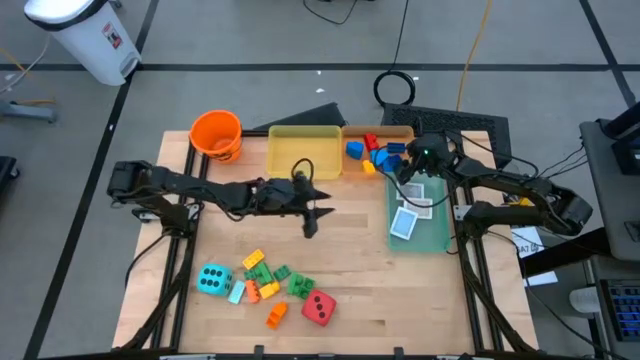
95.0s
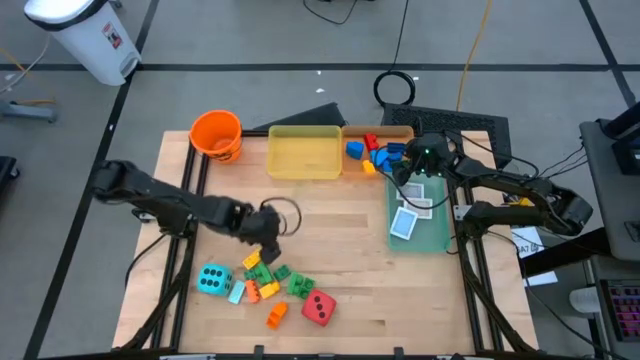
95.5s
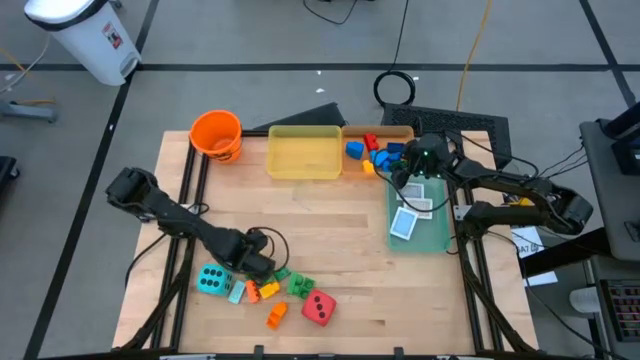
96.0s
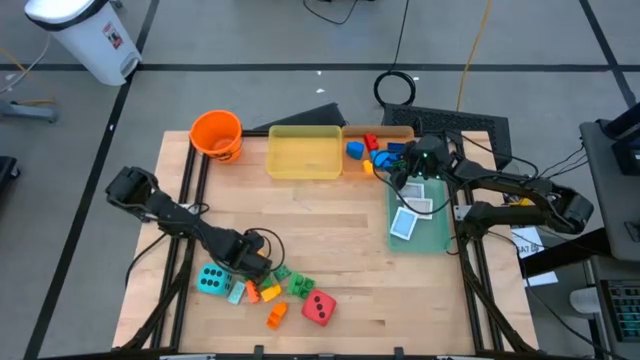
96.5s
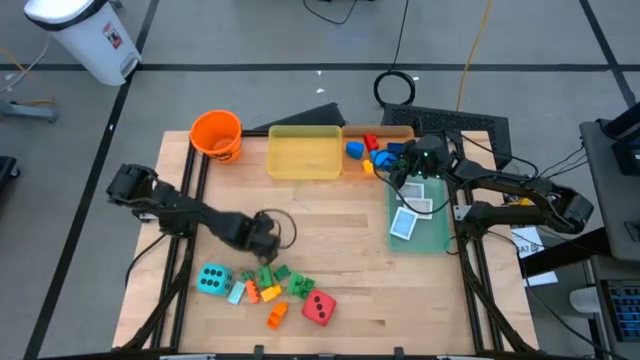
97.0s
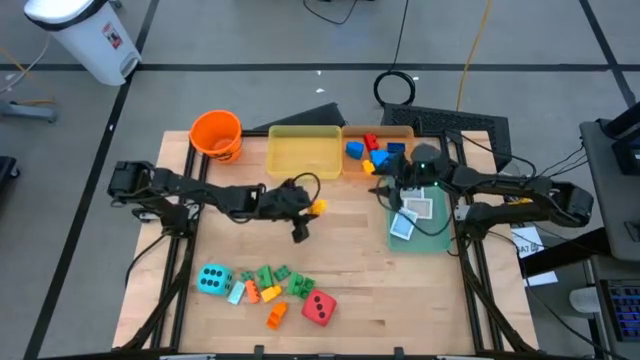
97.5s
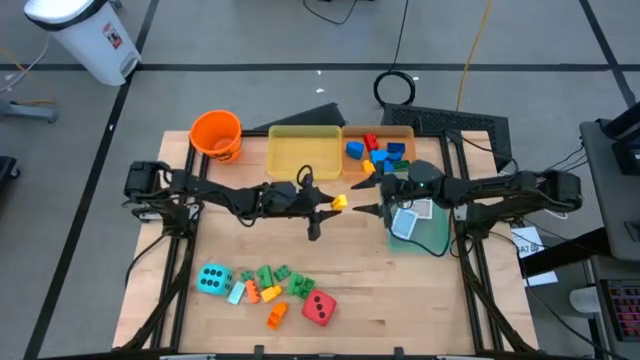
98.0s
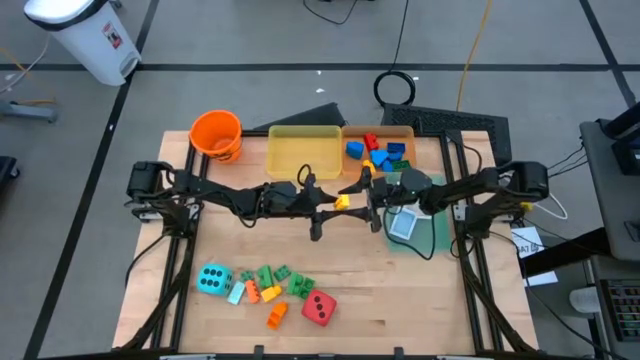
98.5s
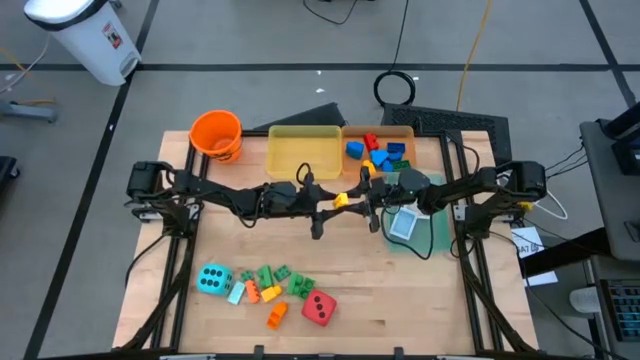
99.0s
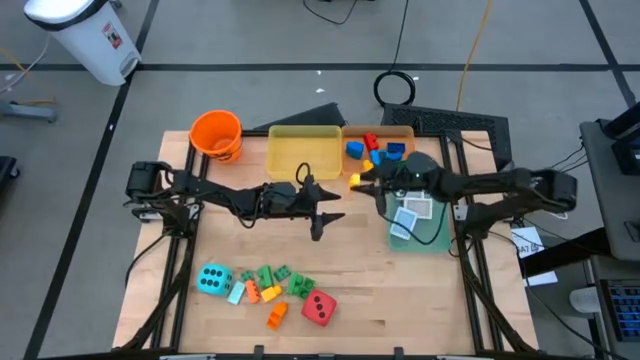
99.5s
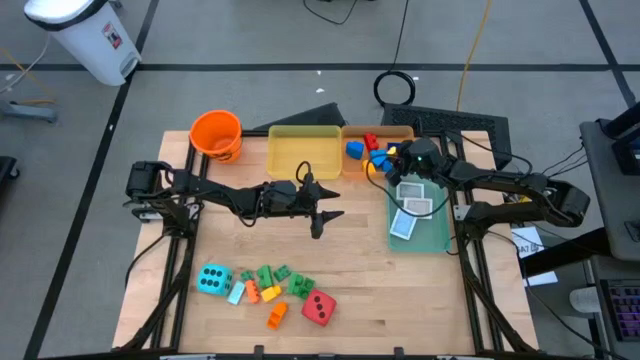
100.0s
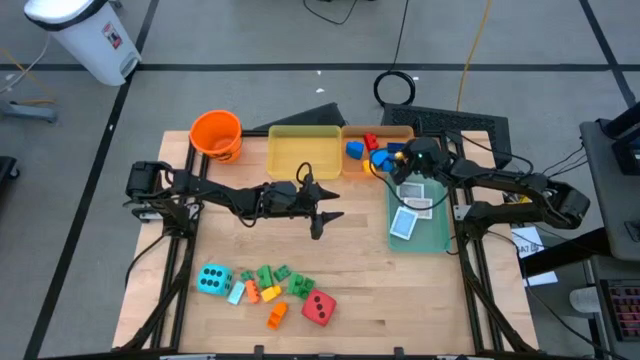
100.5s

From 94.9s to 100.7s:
Task: Pick & Place Toys
Put the yellow game piece into the orange bin

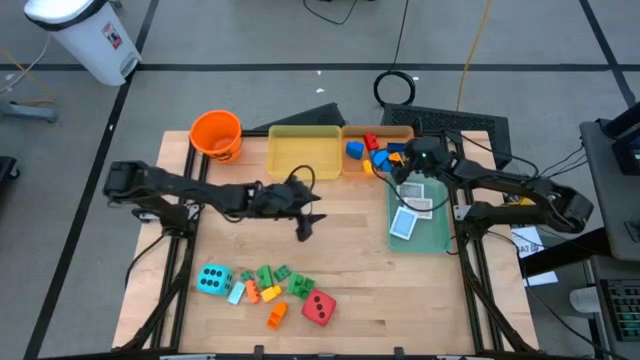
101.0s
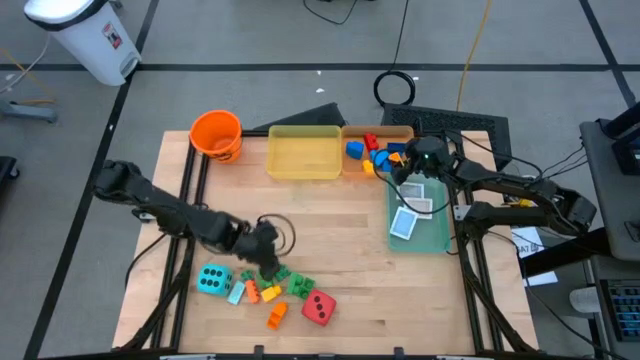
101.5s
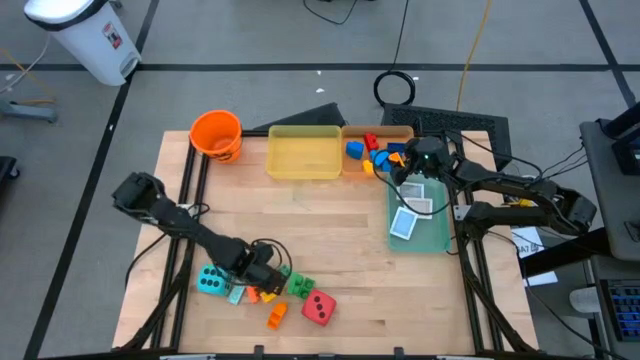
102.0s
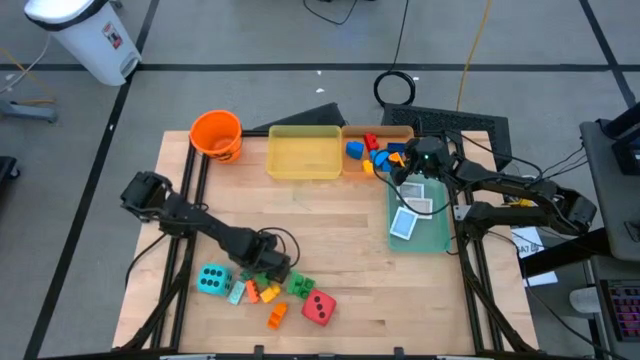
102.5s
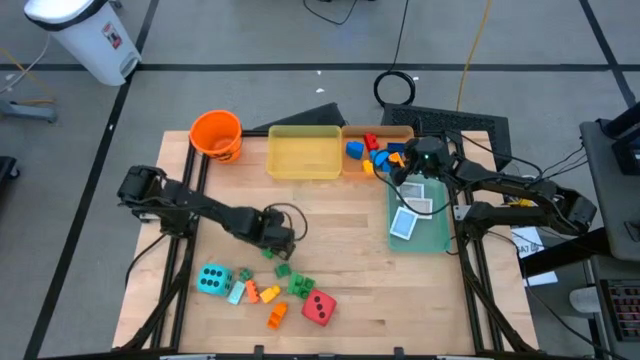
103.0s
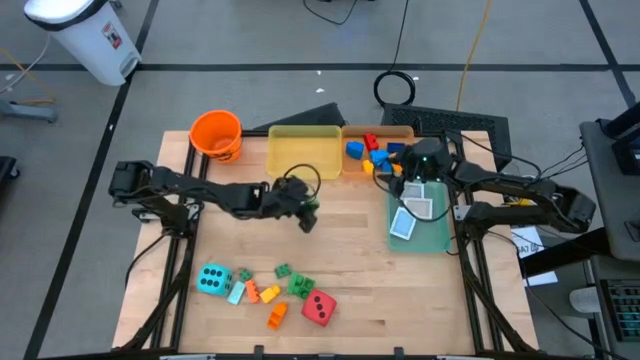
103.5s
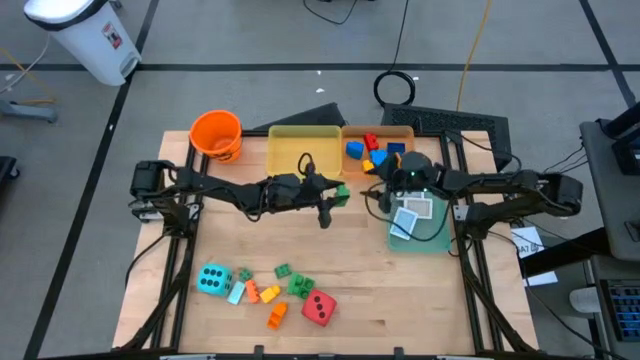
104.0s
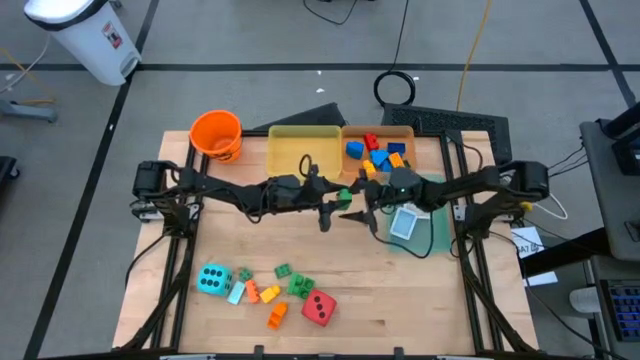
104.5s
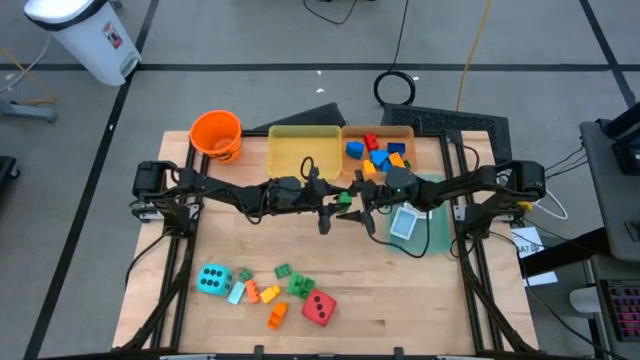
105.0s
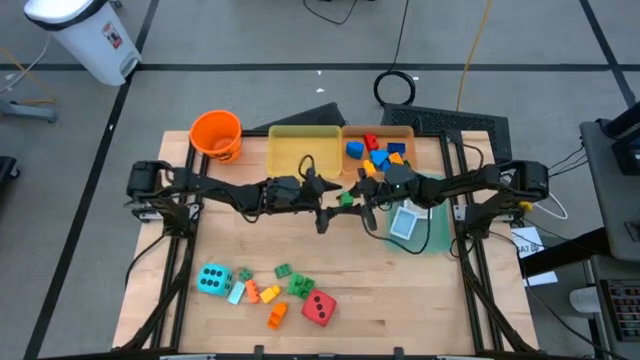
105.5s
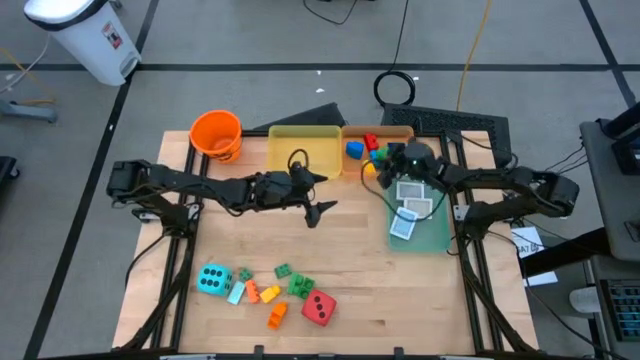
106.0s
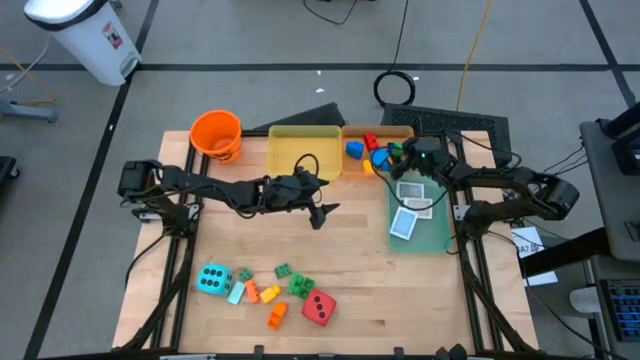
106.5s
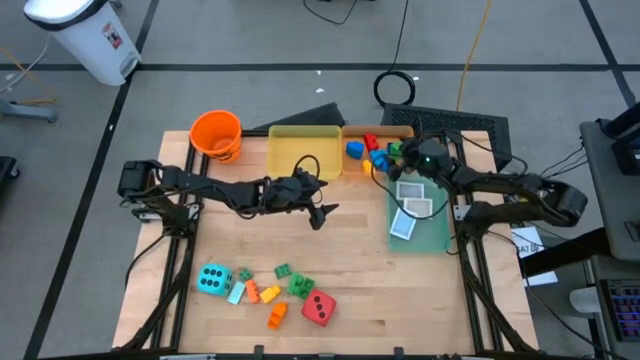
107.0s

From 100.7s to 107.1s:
Put the green game piece into the orange bin

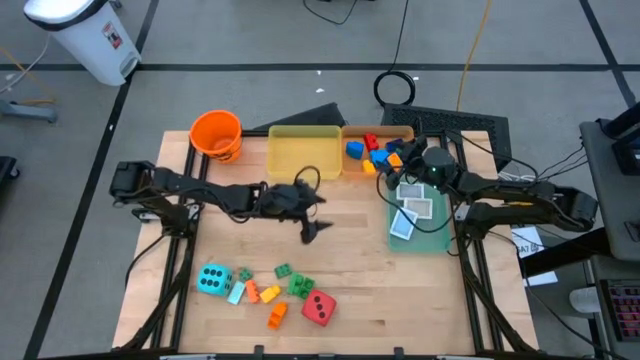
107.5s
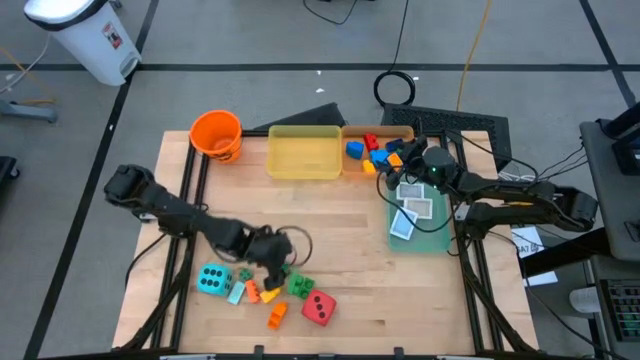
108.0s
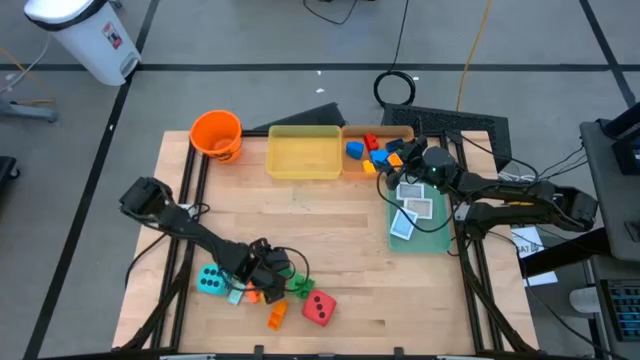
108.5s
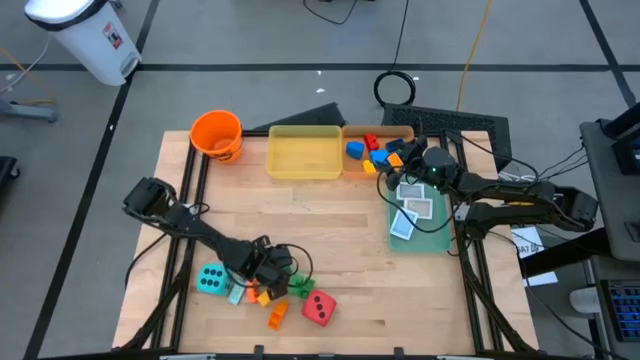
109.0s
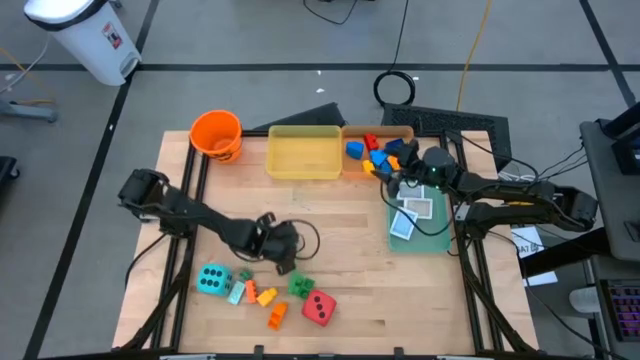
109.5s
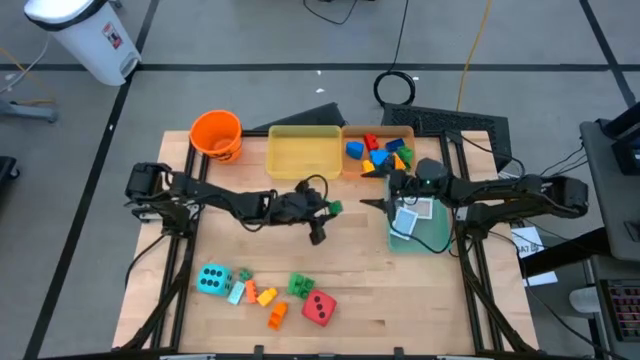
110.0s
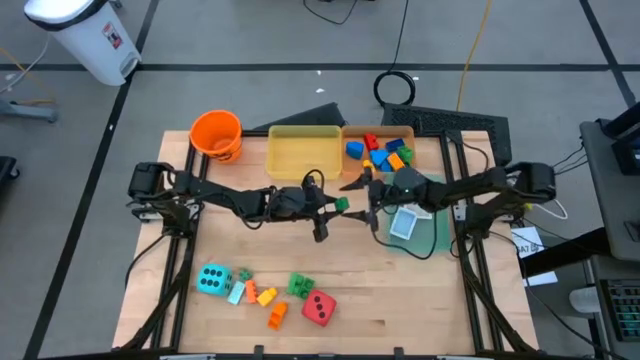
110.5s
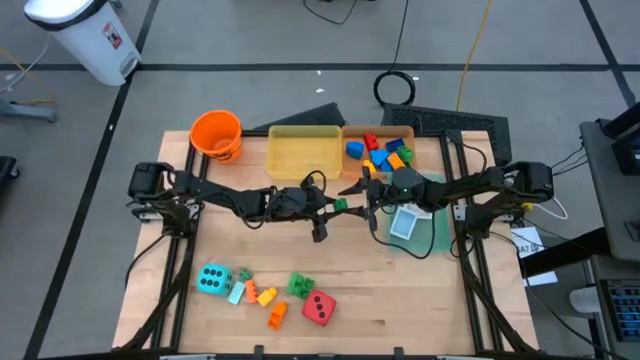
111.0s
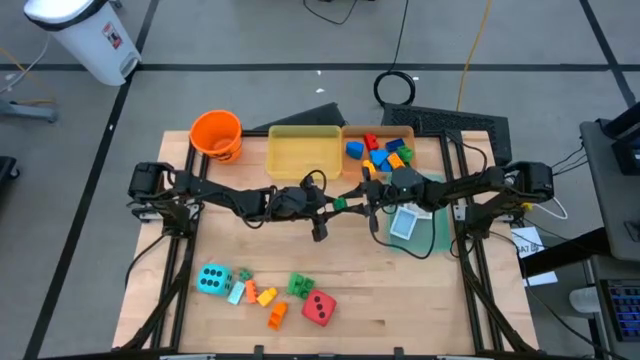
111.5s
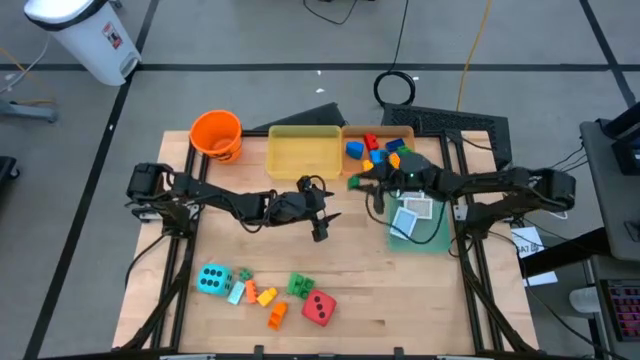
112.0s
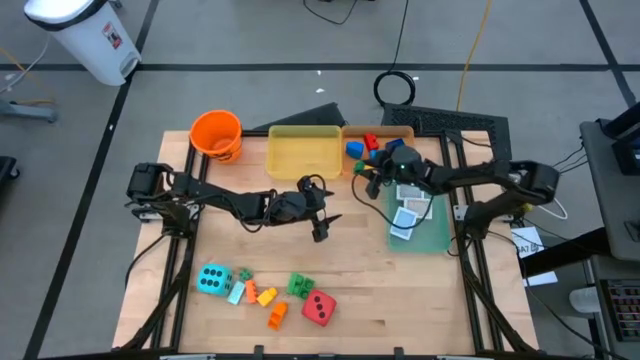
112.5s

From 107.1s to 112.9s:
Put the green game piece into the orange bin

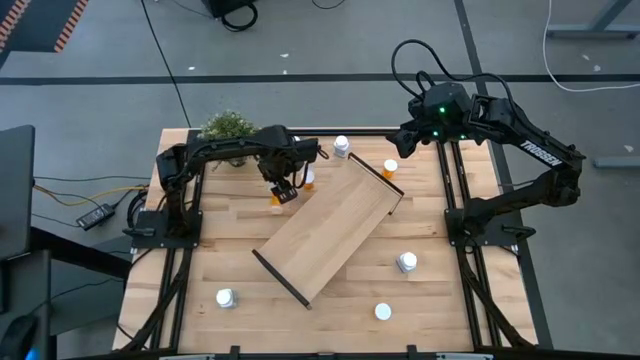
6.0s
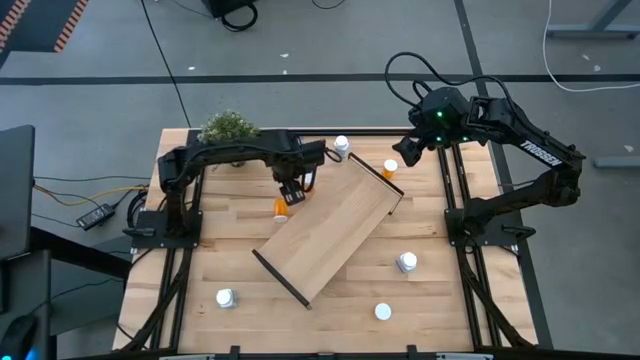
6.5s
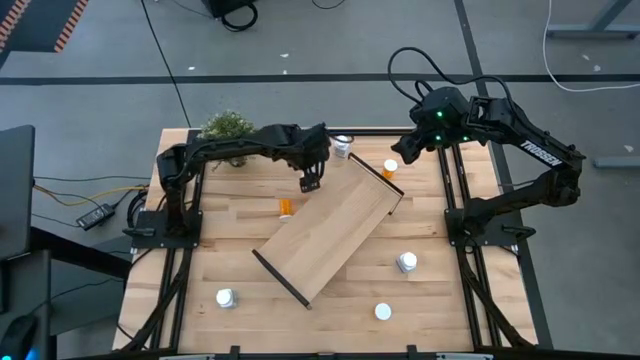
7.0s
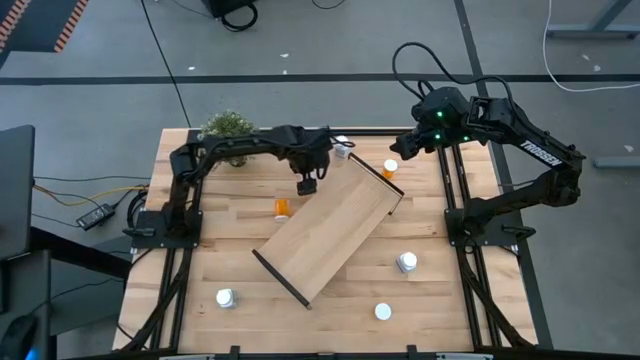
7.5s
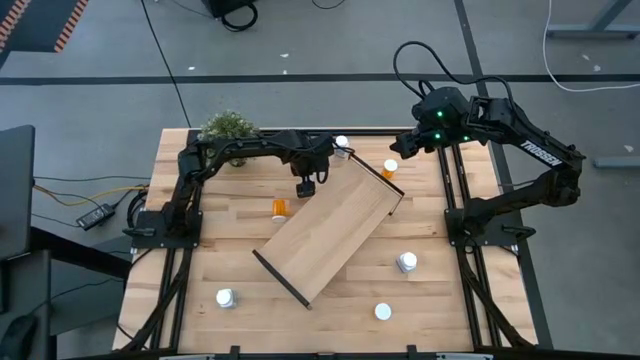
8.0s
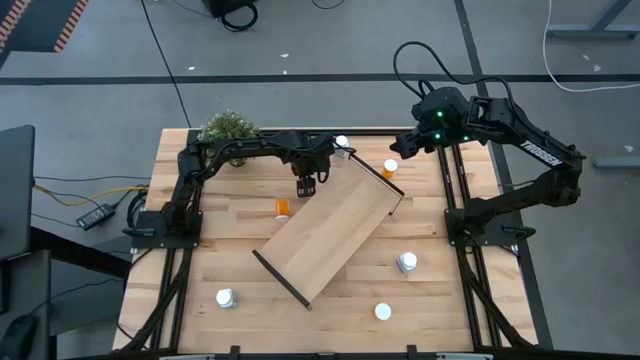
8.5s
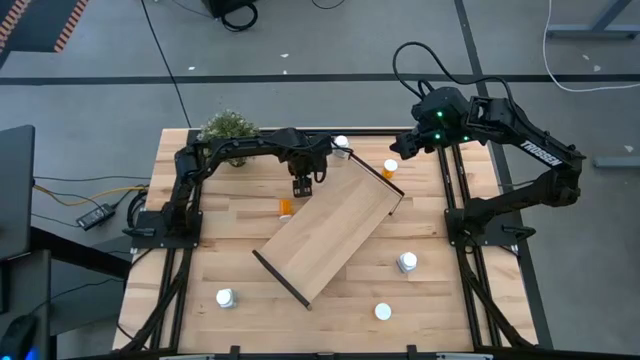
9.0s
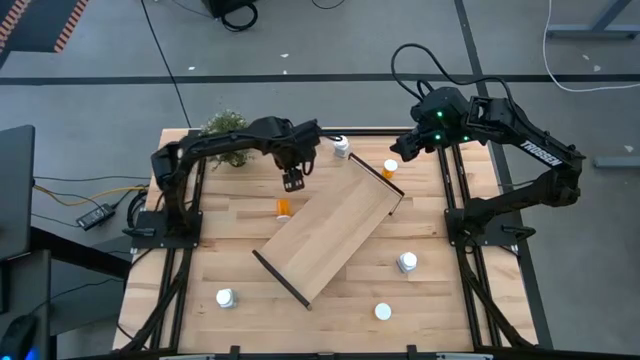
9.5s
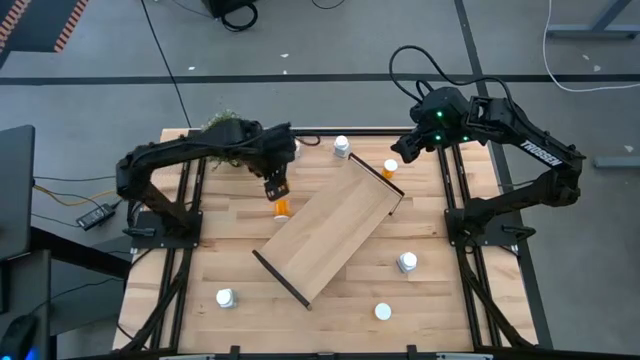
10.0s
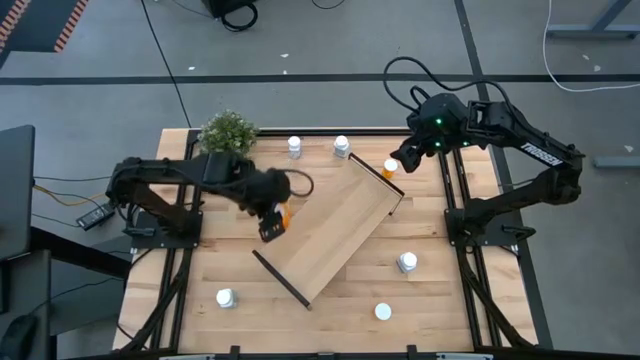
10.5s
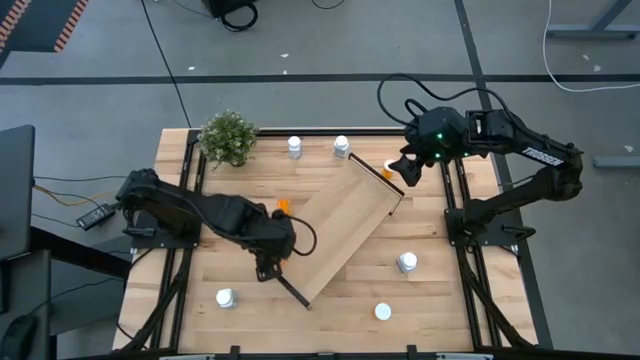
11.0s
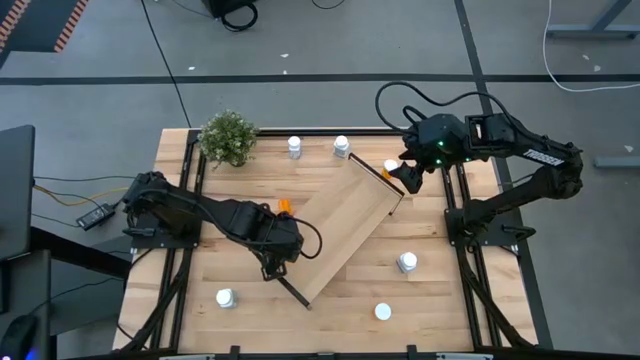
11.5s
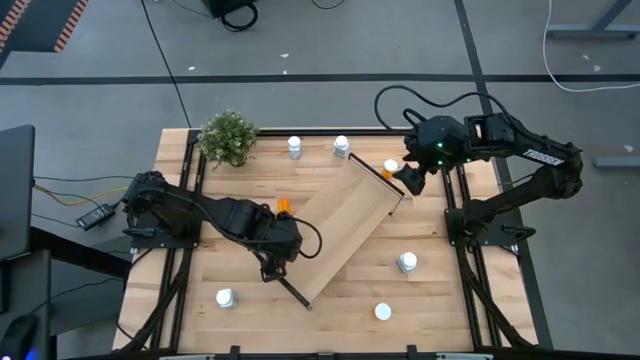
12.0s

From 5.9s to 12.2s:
Task: Pick and place medicine bottles onto shelf by color
Put the middle orange pill bottle on the shelf
